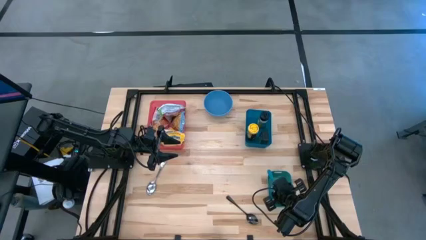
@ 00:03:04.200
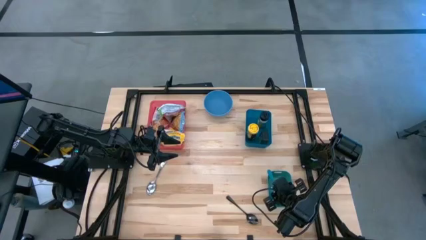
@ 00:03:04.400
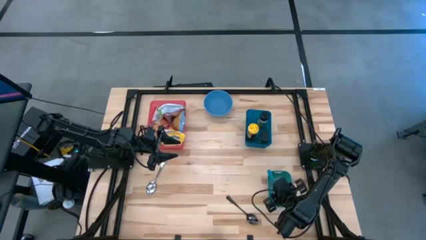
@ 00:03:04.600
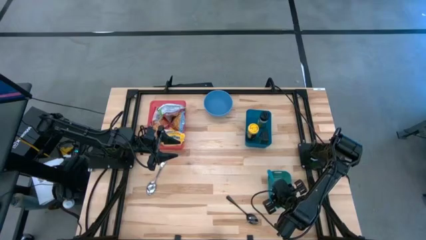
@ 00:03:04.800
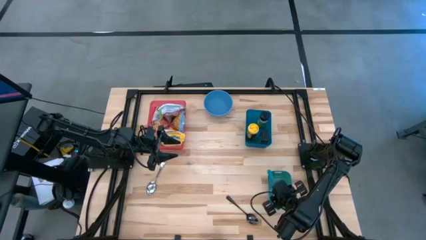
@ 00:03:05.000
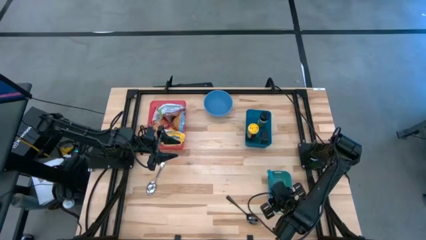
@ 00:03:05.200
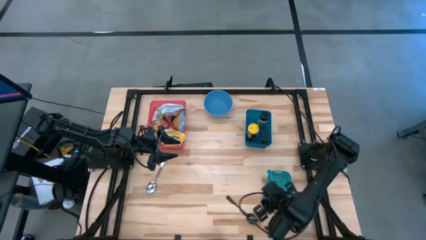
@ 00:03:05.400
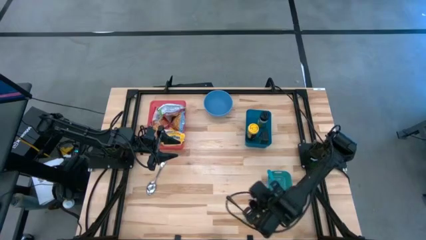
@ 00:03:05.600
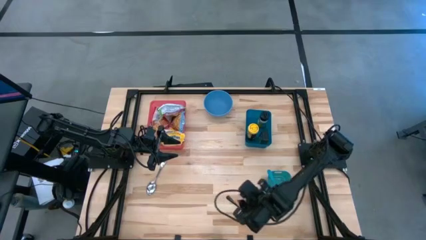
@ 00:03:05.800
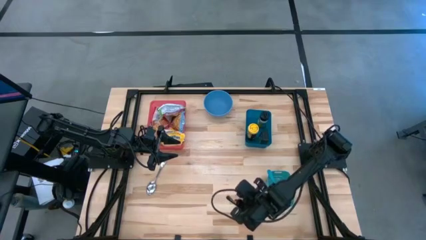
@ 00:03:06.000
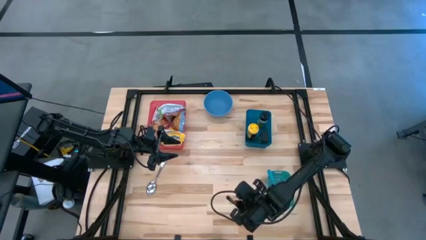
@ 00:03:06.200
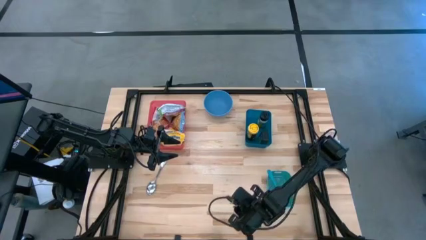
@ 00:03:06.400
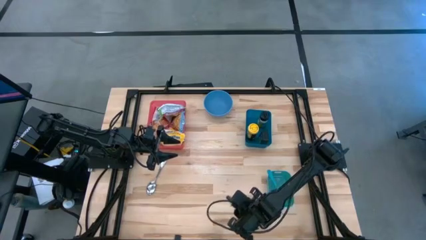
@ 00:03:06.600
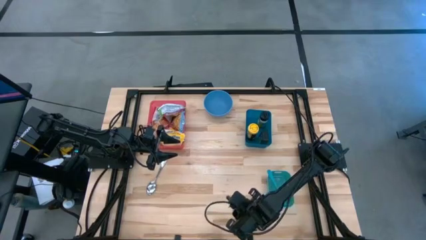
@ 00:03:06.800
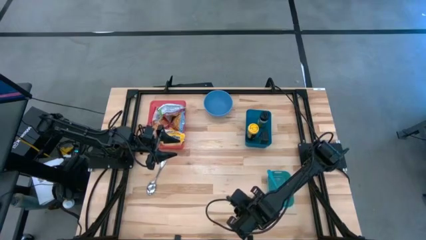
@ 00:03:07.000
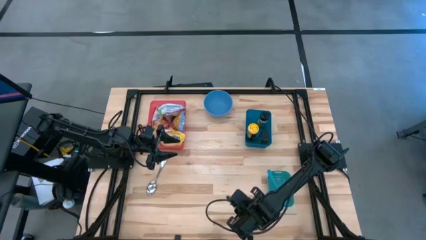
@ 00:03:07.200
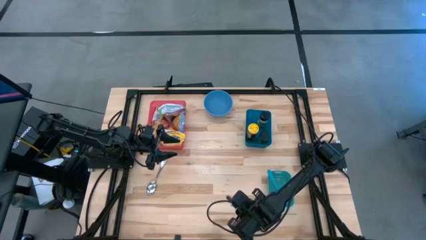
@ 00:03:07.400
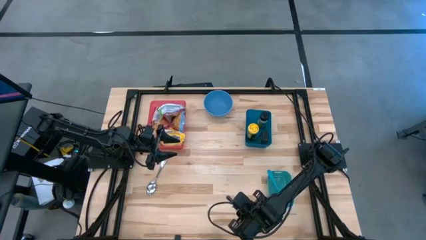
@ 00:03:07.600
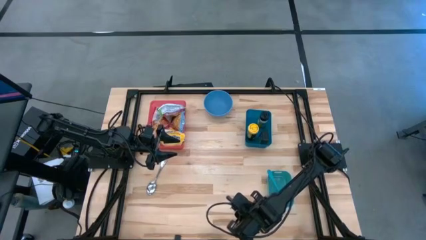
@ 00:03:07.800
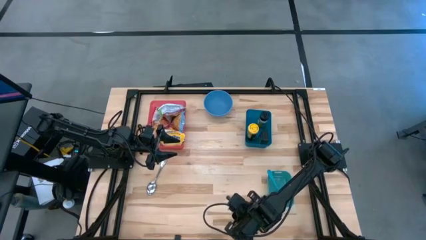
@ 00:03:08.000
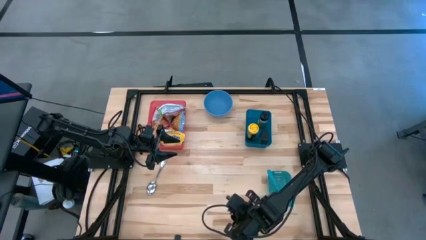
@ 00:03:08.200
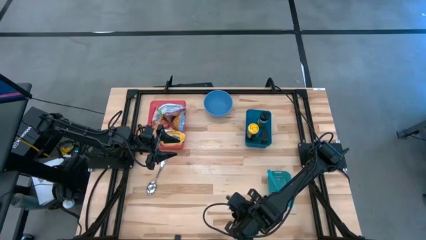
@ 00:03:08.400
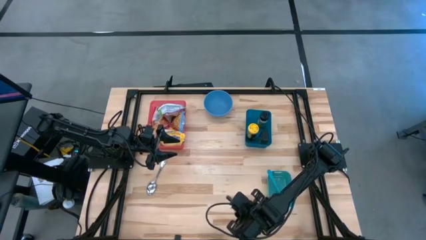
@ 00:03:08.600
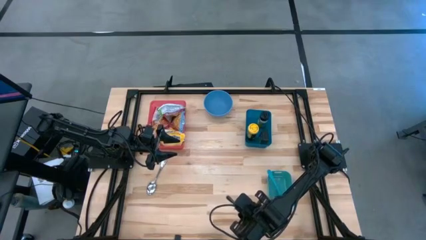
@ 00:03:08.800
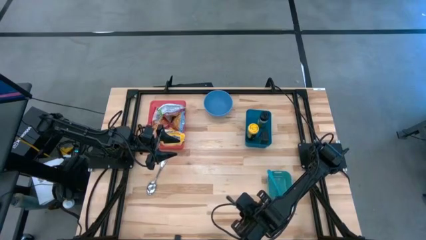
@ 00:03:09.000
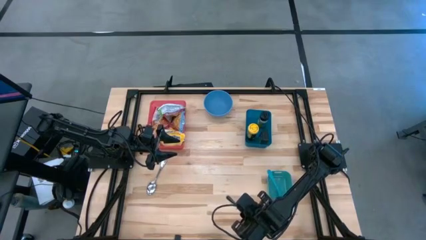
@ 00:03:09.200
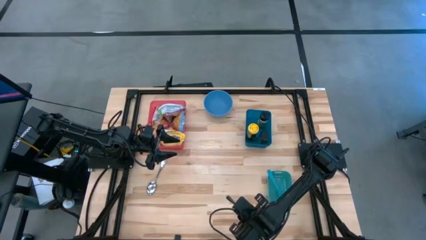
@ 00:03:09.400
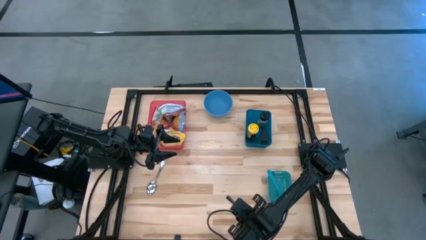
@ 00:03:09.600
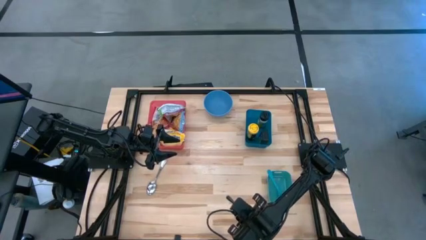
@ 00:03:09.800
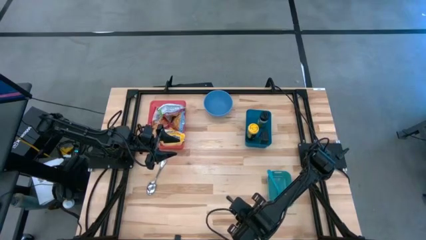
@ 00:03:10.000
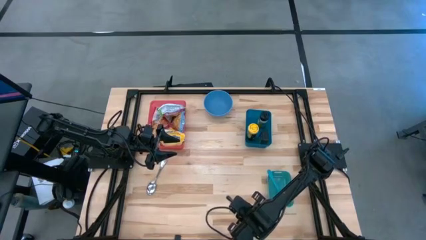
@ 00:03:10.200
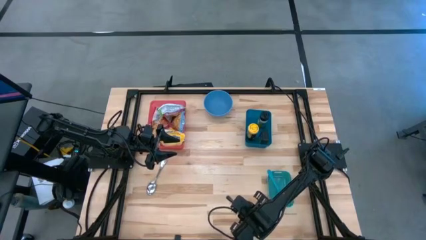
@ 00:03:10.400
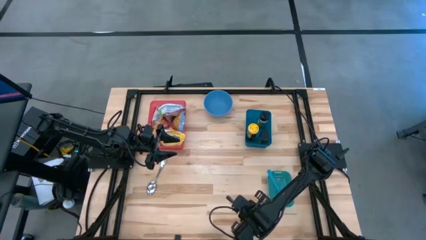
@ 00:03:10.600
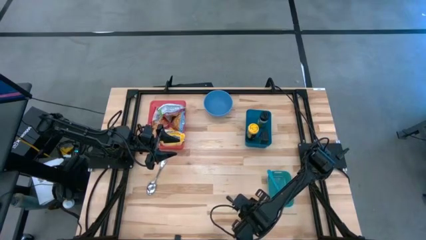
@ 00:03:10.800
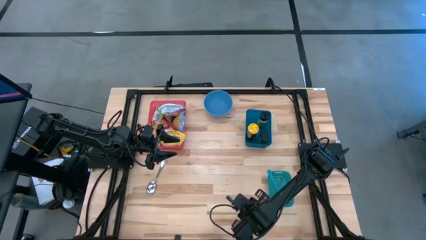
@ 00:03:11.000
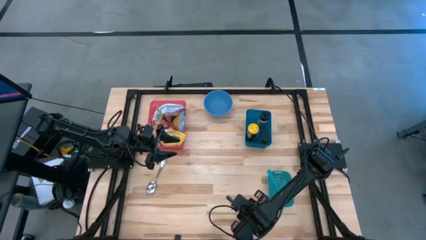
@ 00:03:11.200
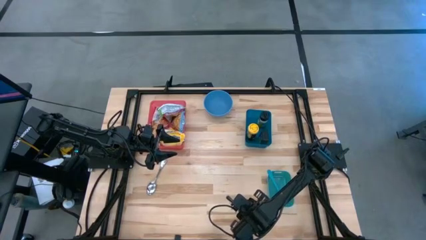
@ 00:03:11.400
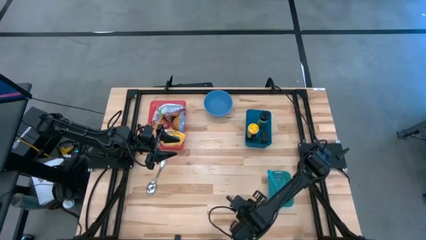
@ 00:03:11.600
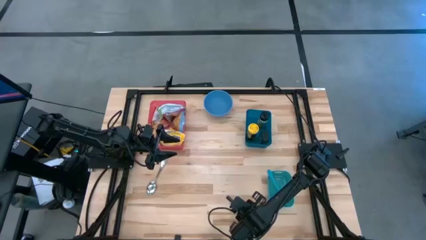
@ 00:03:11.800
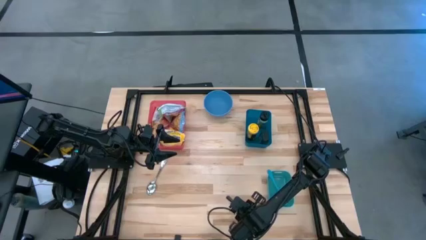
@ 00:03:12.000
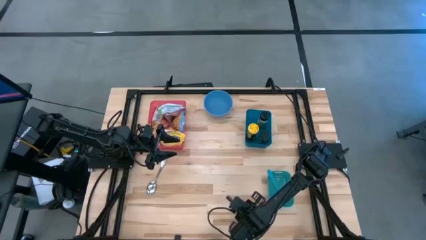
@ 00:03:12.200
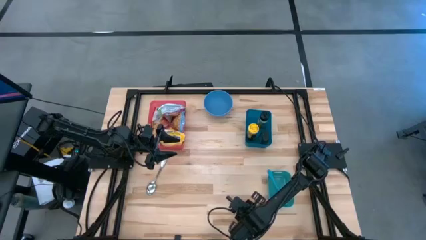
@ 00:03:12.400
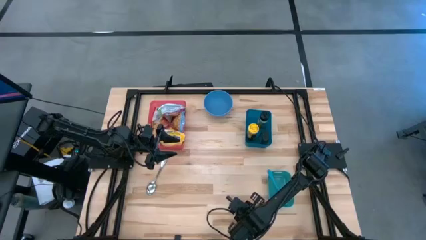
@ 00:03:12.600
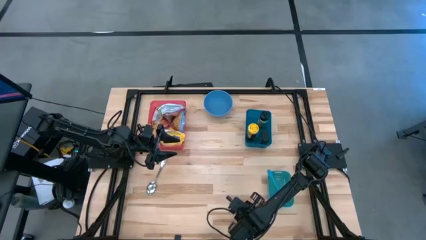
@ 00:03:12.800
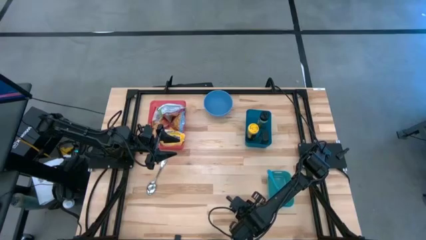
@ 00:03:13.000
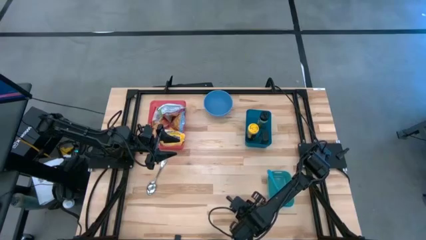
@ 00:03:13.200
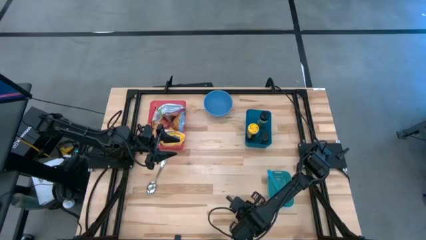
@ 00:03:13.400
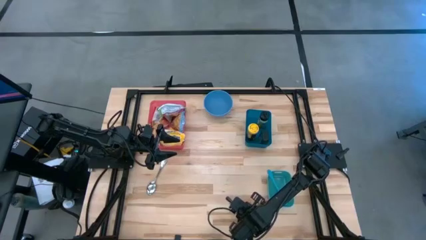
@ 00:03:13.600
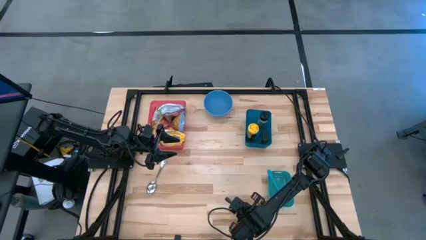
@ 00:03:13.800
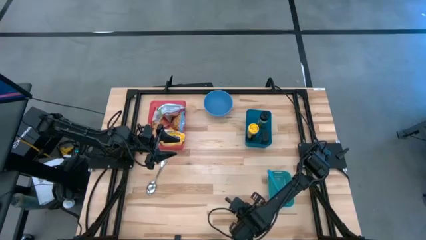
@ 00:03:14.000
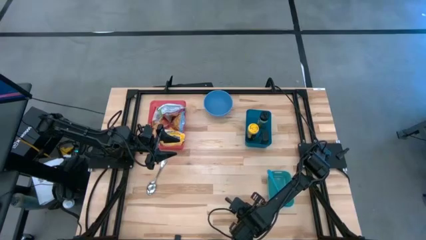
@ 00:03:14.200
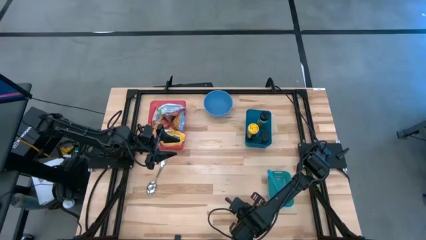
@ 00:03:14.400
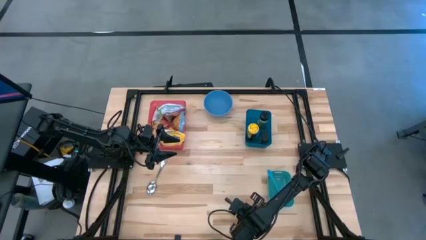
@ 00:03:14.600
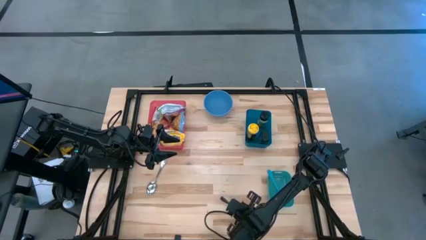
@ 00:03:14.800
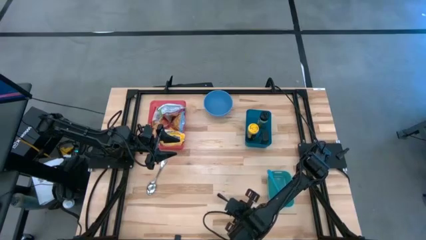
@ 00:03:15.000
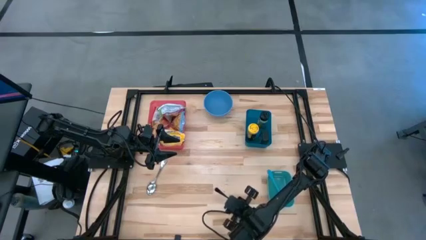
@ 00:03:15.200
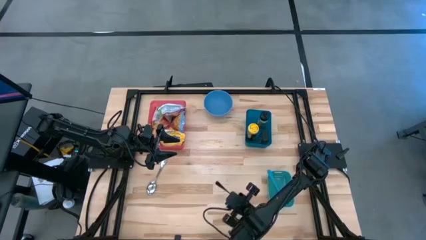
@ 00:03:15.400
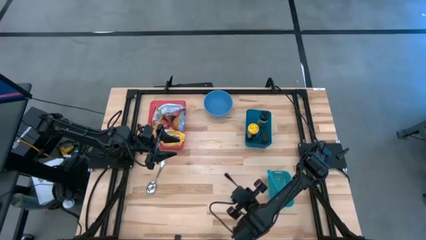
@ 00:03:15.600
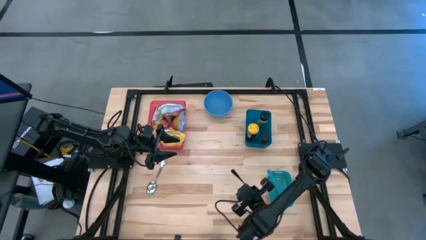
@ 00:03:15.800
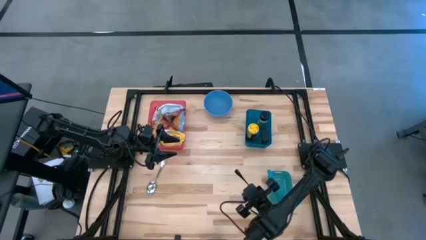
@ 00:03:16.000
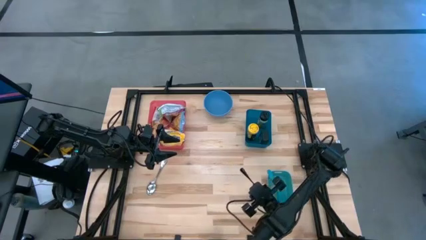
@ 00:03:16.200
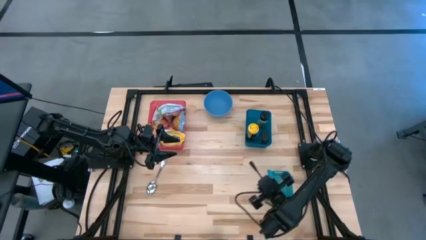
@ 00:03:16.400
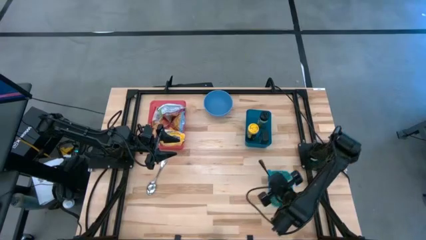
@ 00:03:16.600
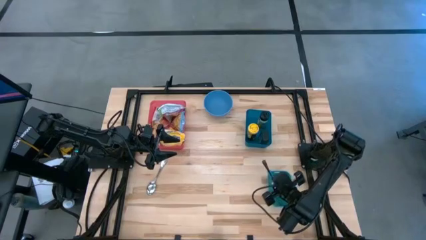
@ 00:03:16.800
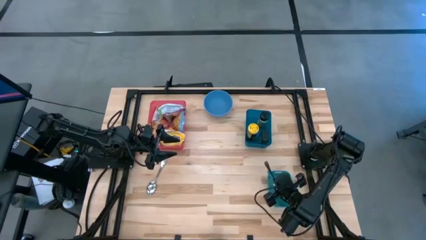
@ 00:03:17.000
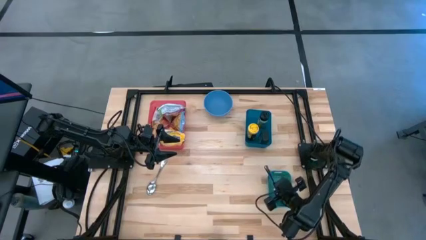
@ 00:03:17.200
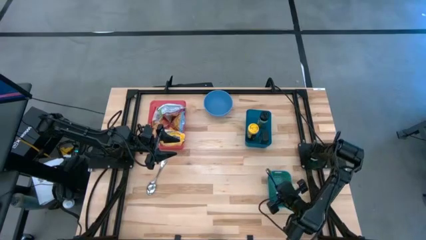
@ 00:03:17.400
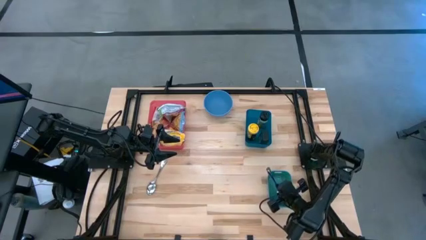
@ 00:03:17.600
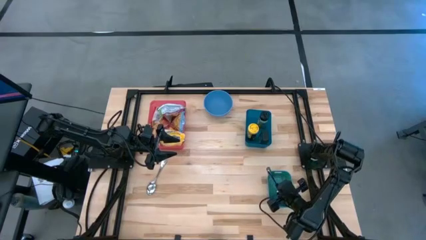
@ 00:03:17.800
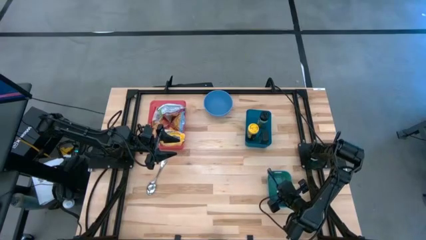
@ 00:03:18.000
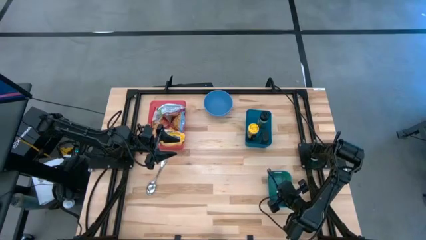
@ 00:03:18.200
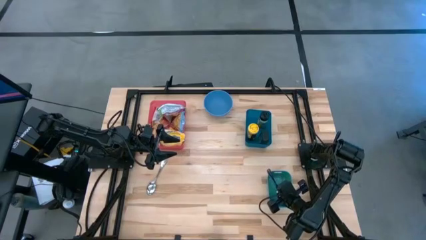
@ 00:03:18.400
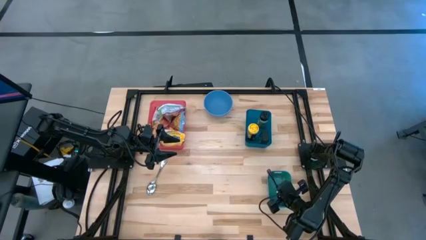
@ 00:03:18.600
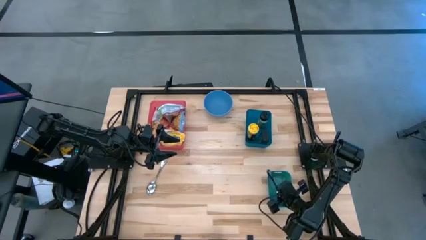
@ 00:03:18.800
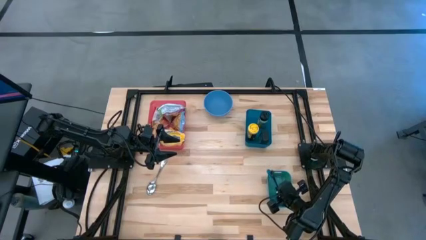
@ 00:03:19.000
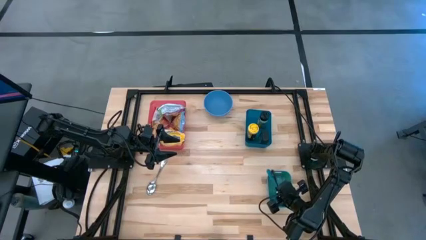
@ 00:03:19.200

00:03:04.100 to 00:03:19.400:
Task: Pick & Place Food Item
Put the black spoon into the green bin
